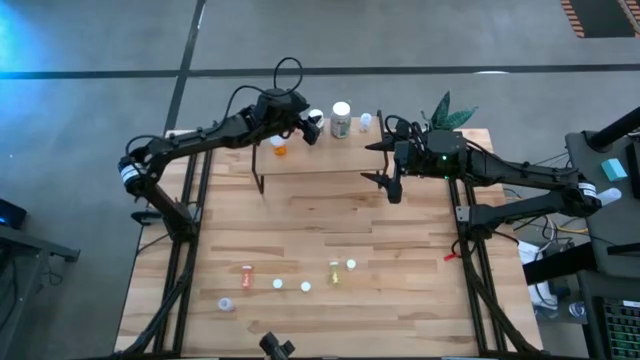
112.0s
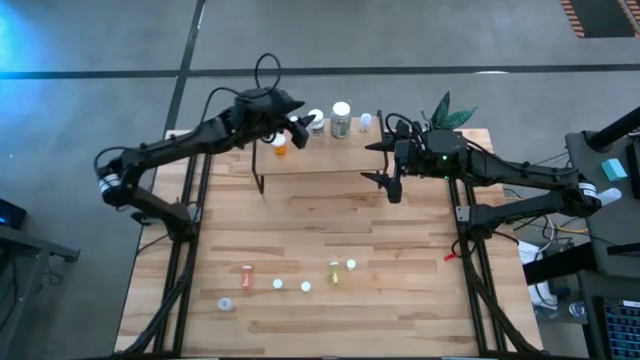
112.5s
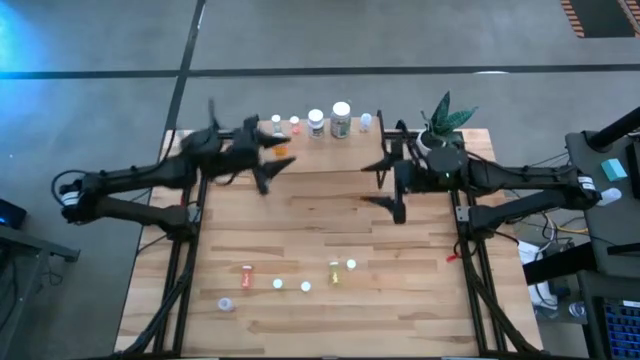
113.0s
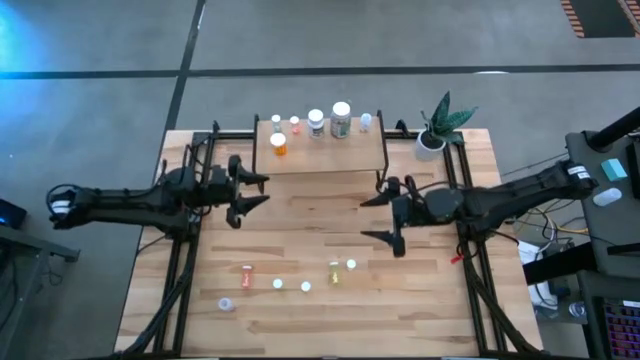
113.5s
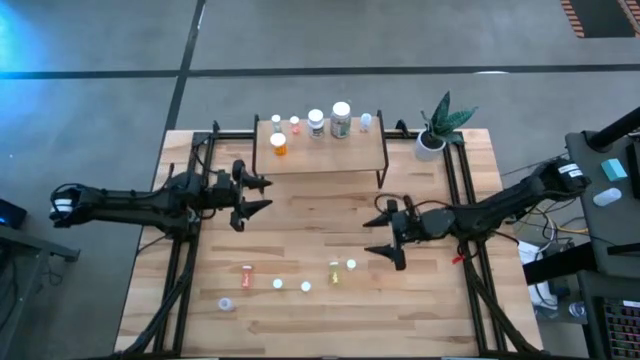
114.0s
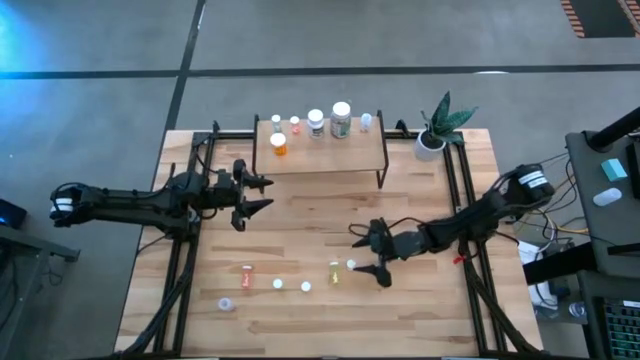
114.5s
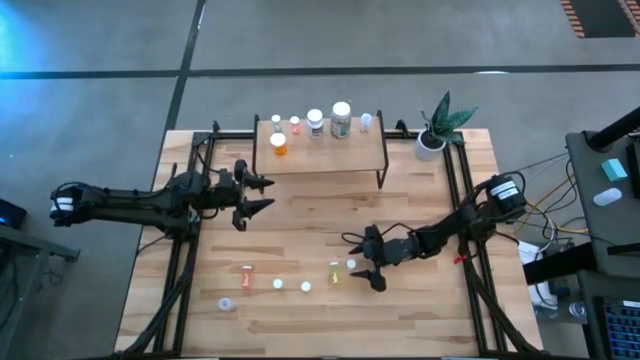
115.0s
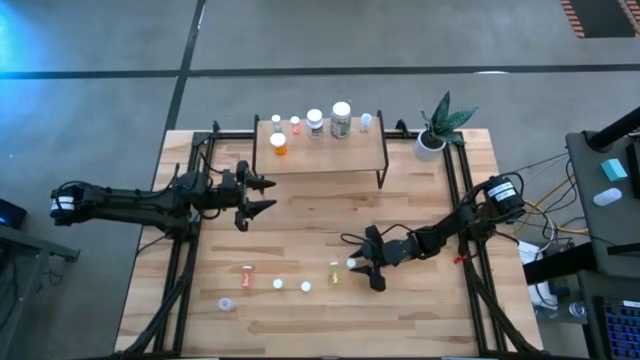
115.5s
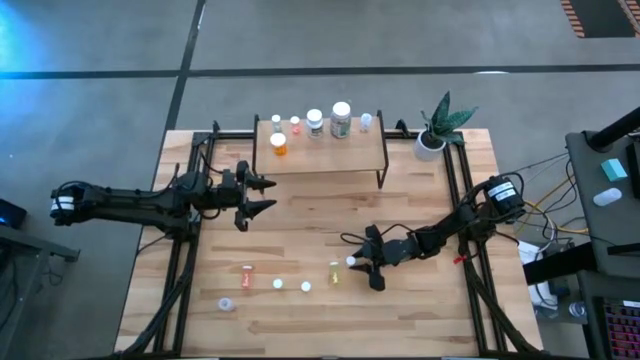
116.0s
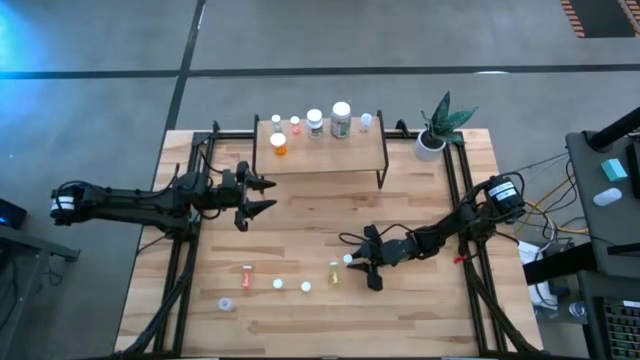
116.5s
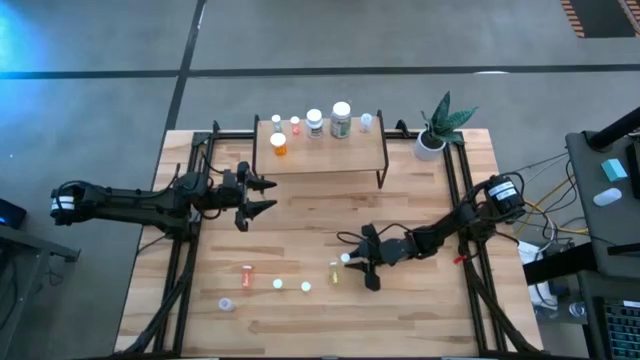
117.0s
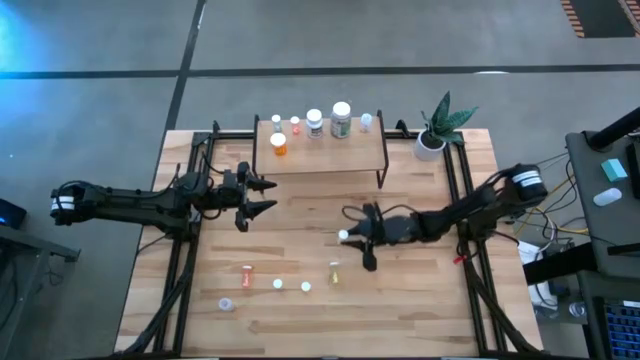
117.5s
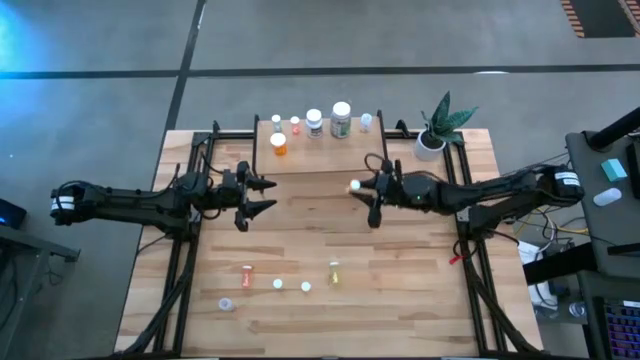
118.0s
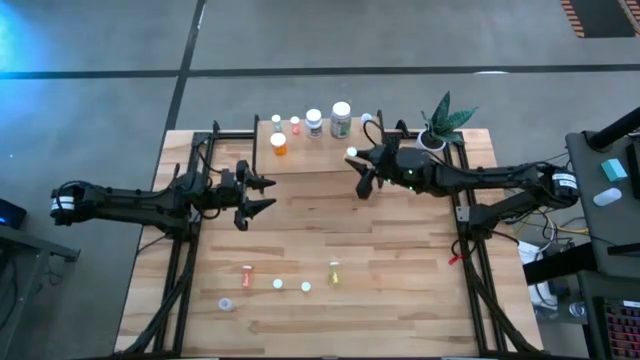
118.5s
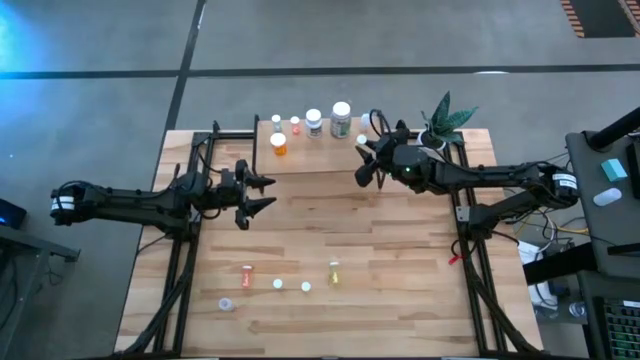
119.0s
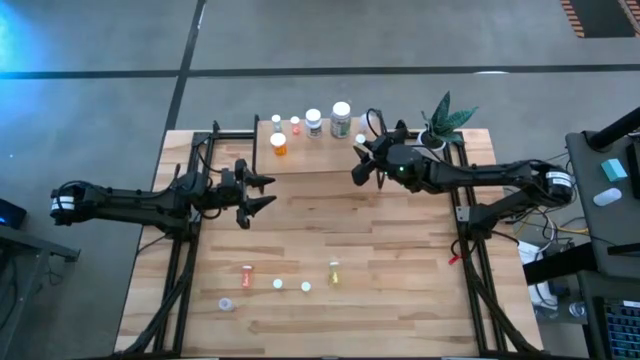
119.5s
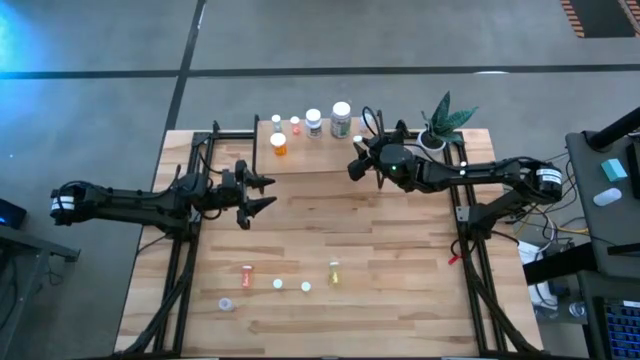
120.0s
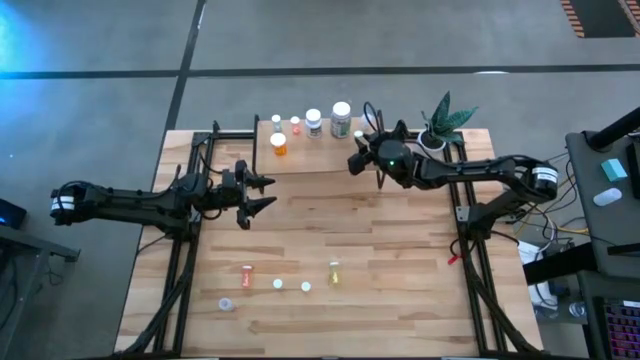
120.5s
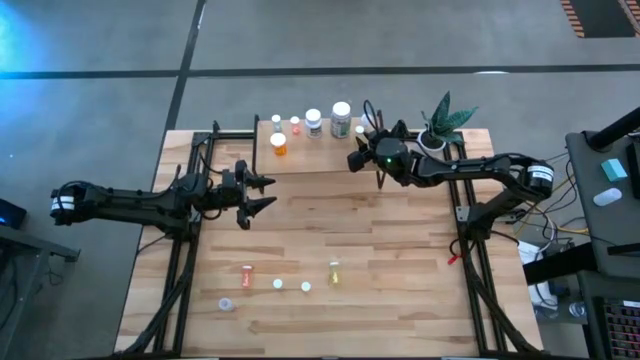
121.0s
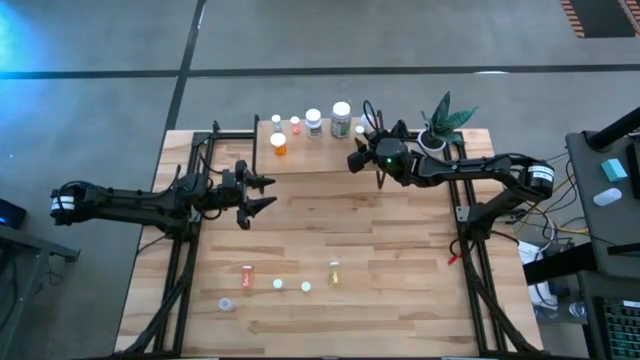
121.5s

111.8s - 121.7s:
Task: Pick and place medicine bottles onto shelf by color
Put the right yellow medicine bottle on the shelf

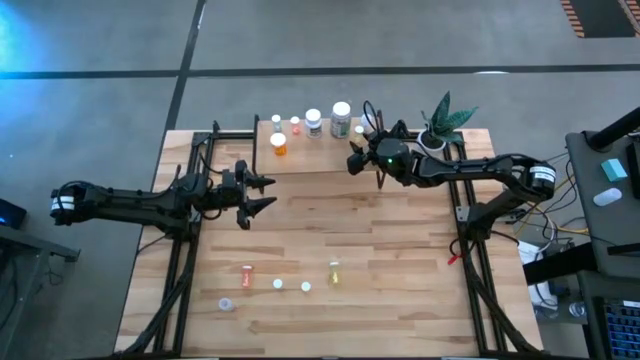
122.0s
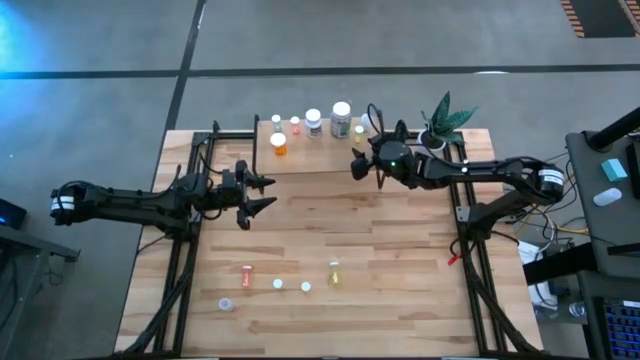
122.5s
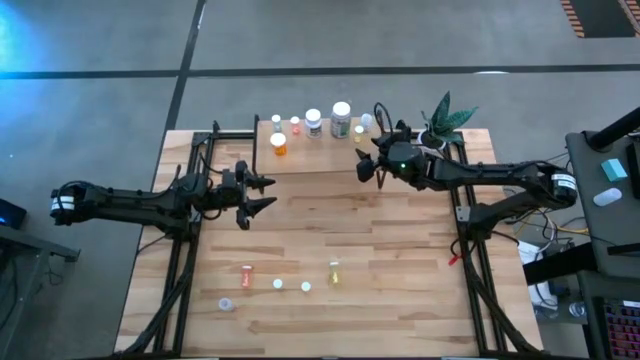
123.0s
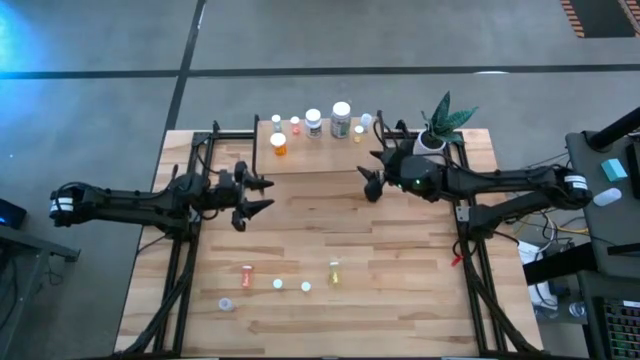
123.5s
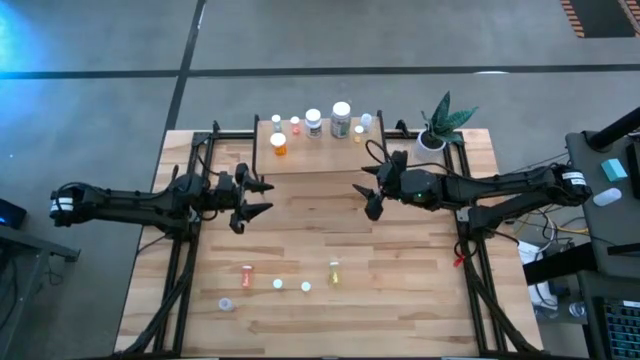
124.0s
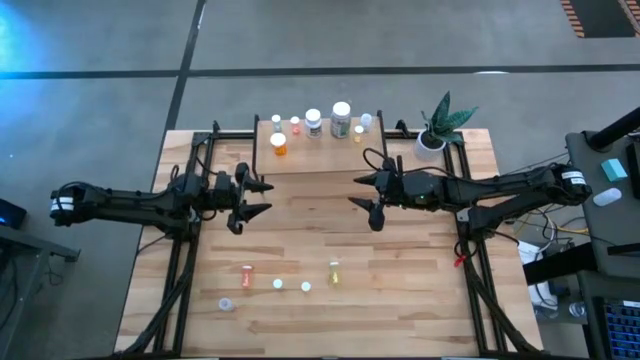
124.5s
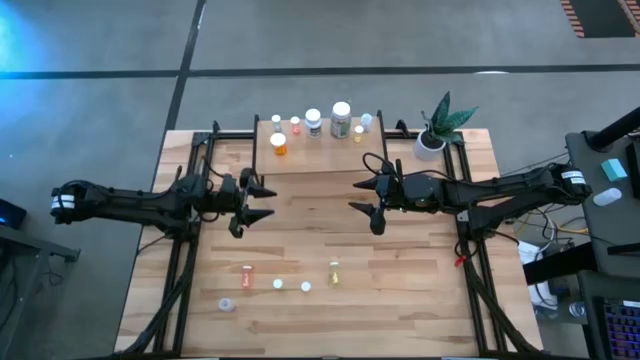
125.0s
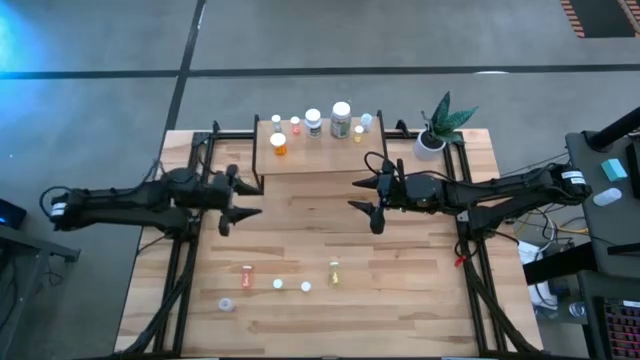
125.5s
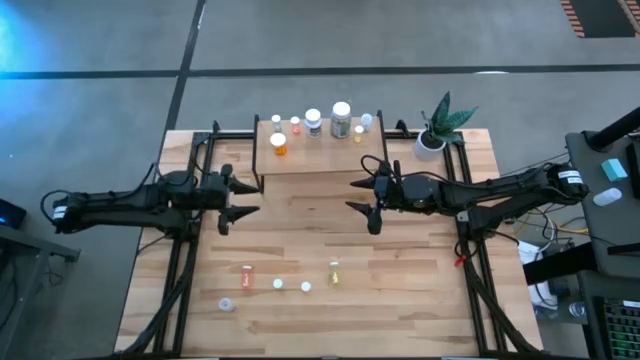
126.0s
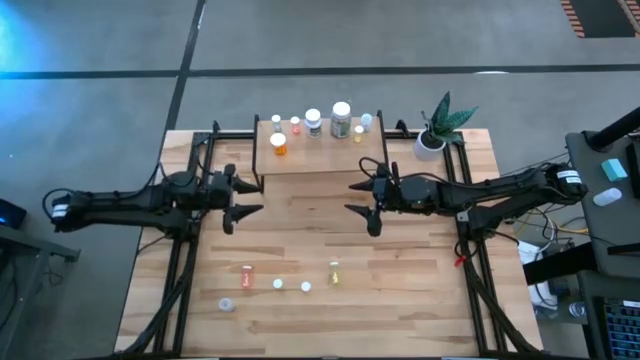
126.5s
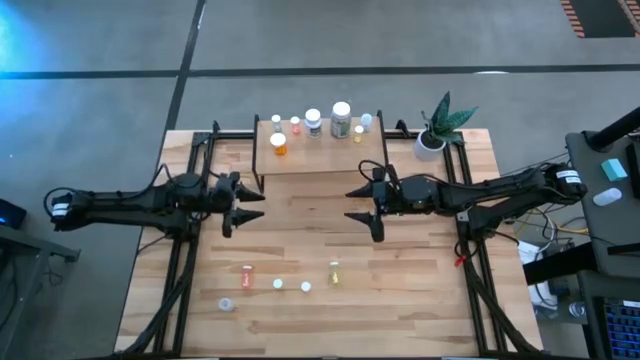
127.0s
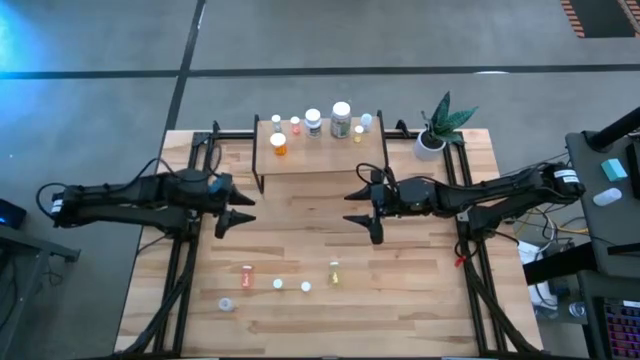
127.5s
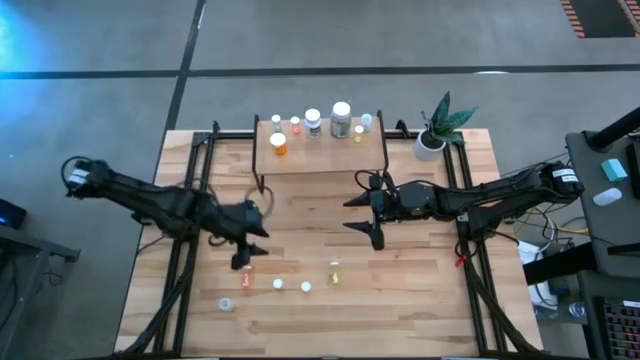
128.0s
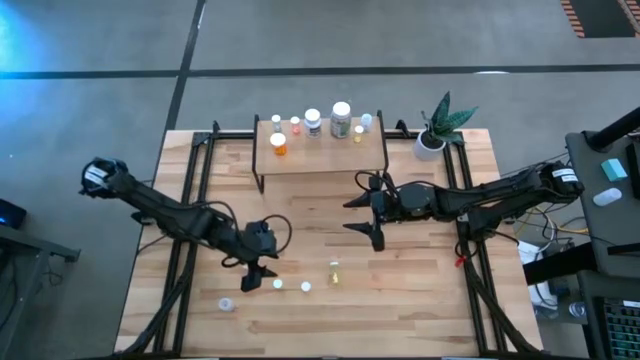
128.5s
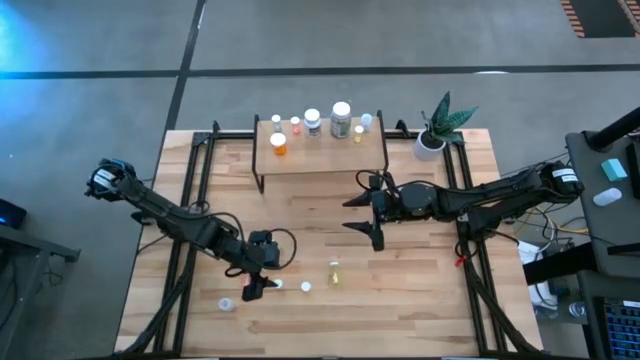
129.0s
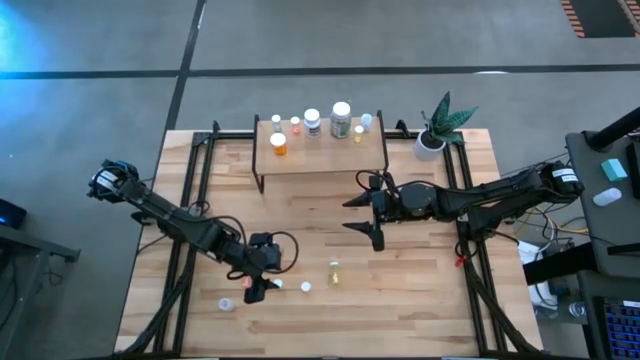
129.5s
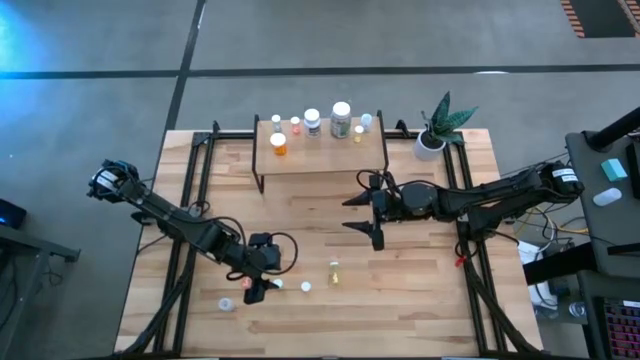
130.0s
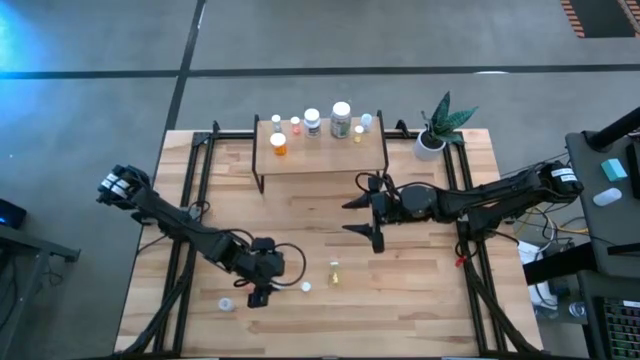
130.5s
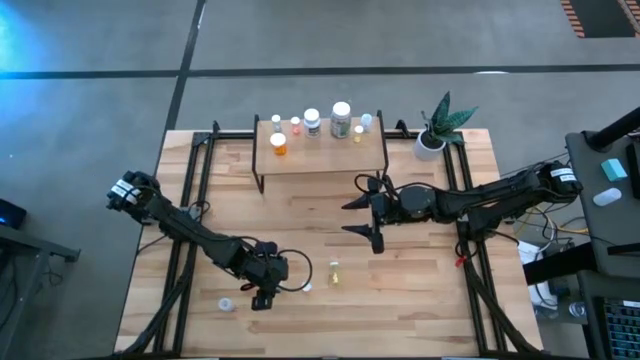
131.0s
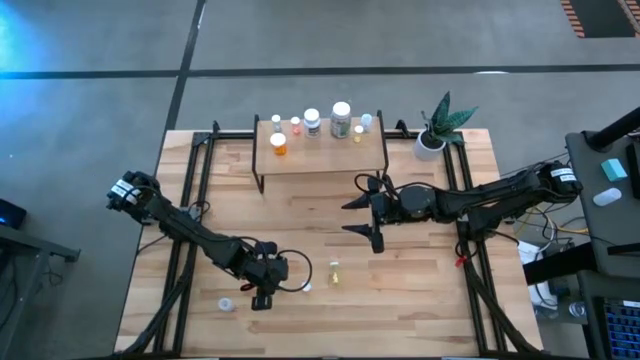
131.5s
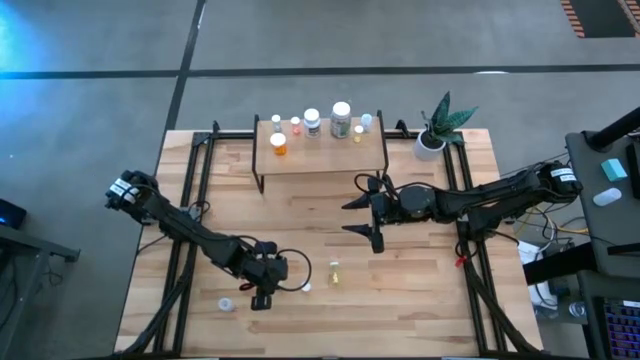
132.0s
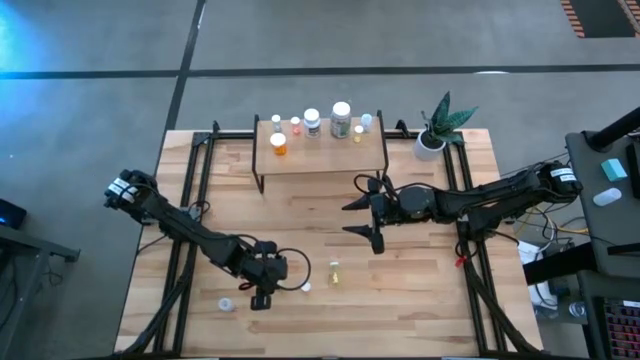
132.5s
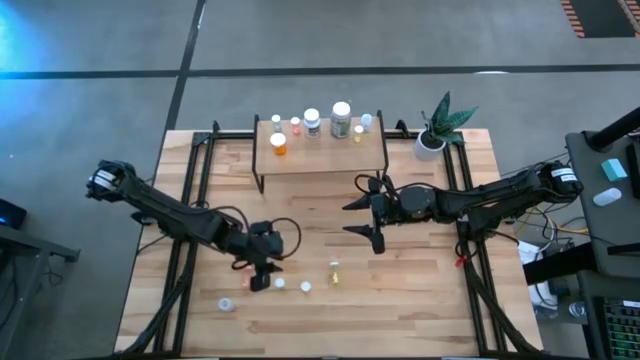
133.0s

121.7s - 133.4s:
Put the left yellow medicine bottle on the shelf

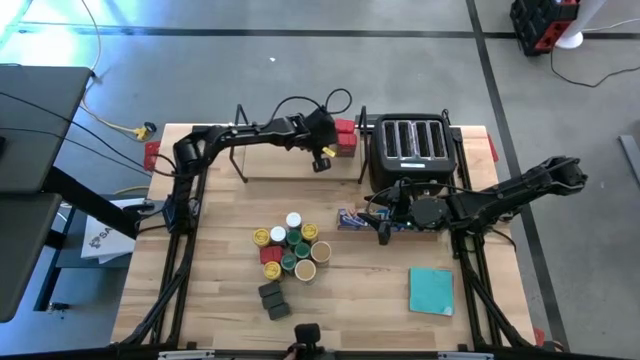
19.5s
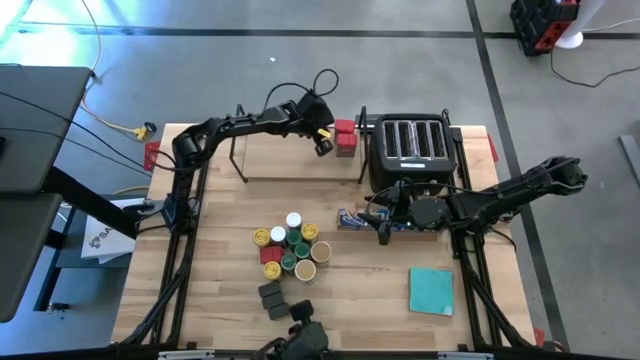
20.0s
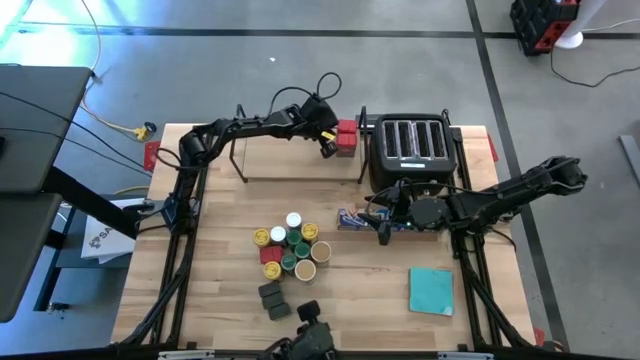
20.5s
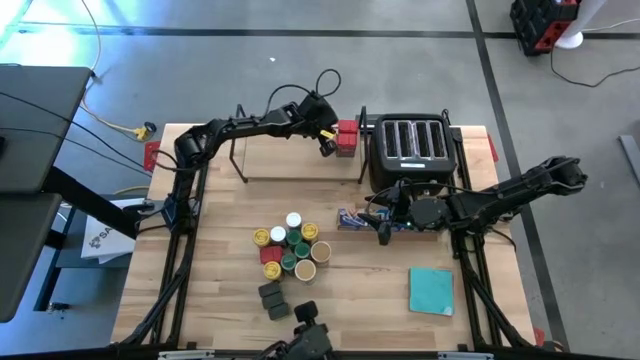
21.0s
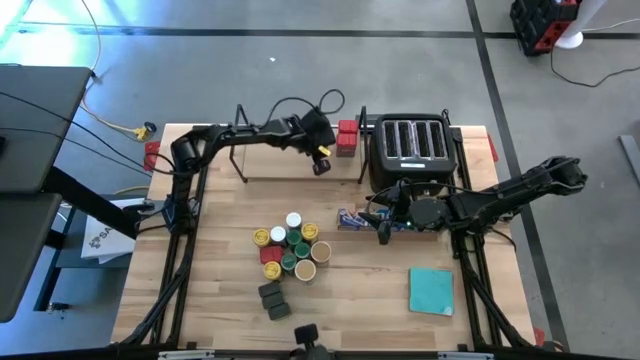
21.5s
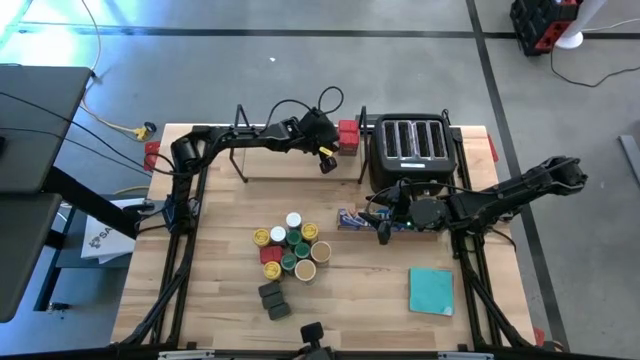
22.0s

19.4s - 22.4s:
Task: Shelf spices
Adjust the red seasoning cans on the shelf
